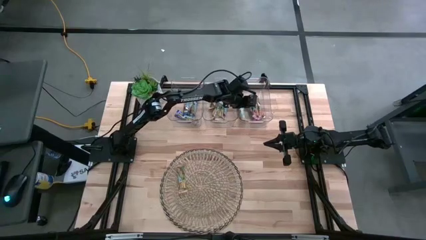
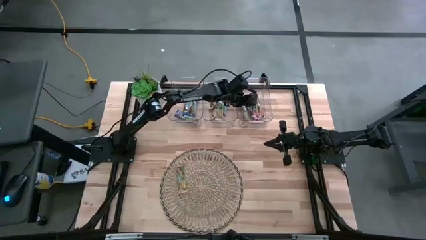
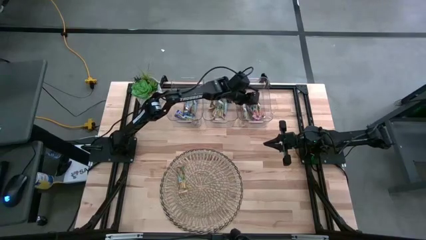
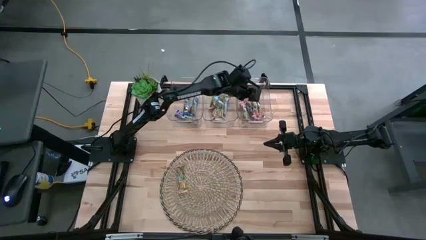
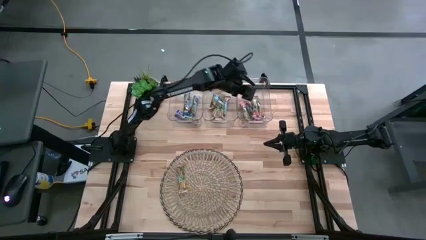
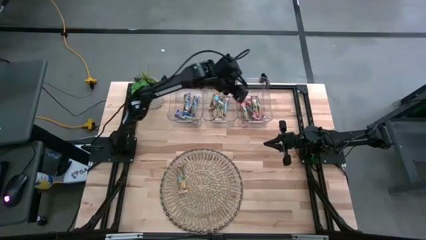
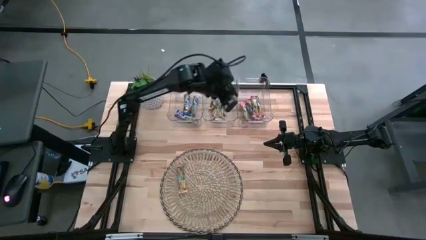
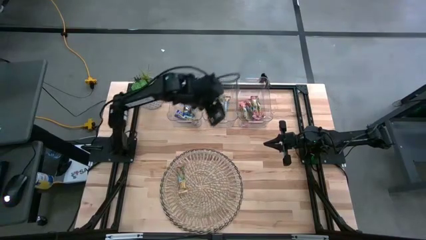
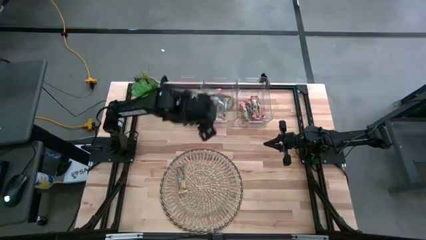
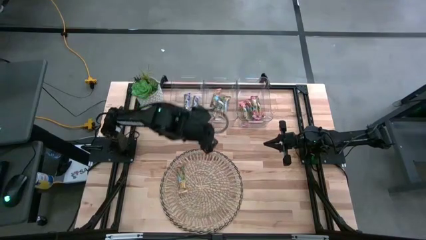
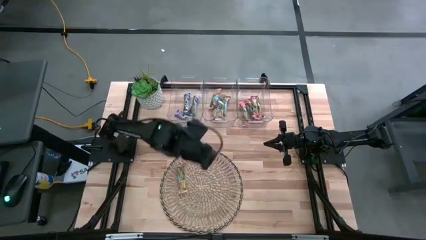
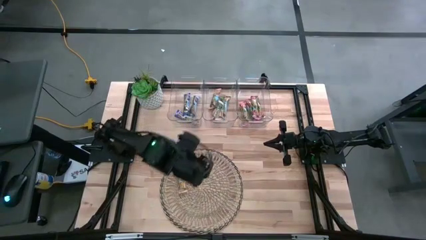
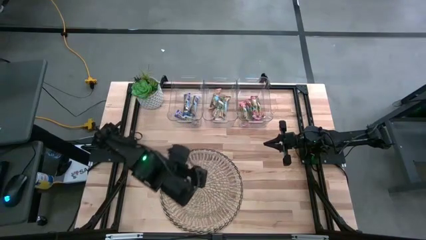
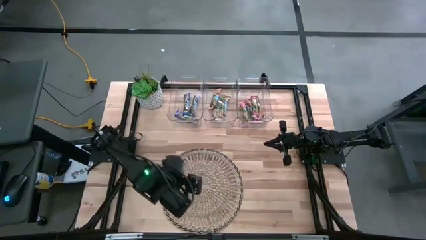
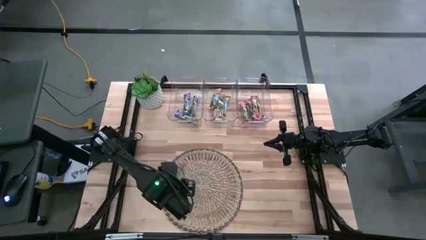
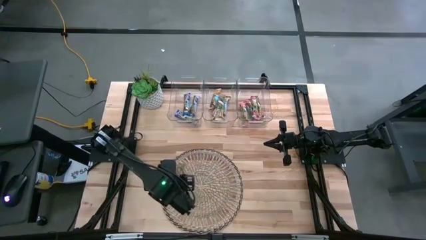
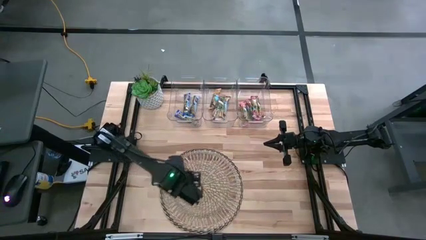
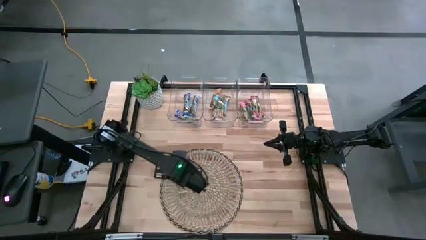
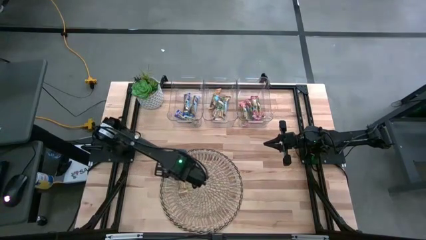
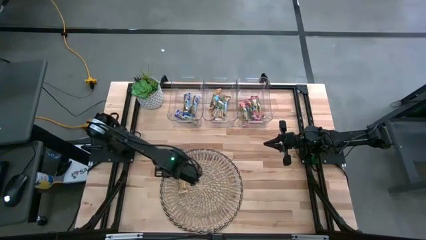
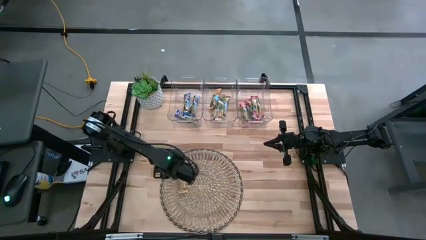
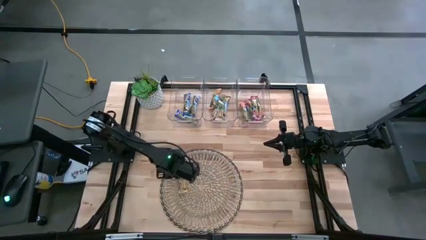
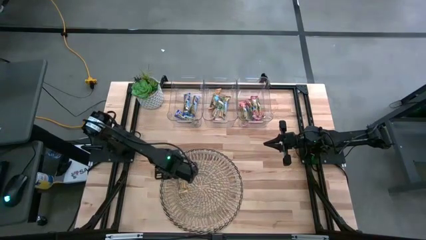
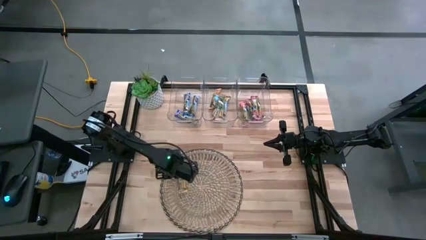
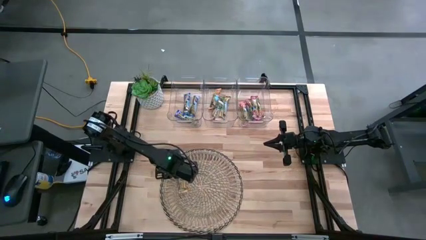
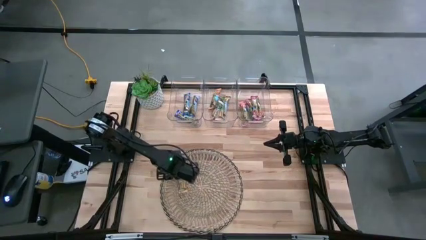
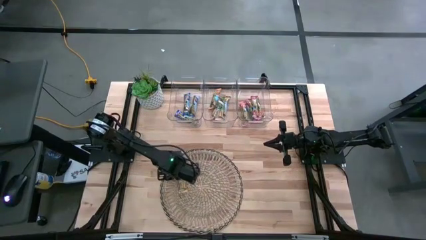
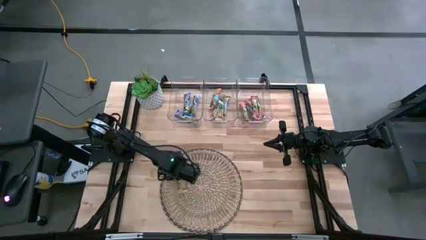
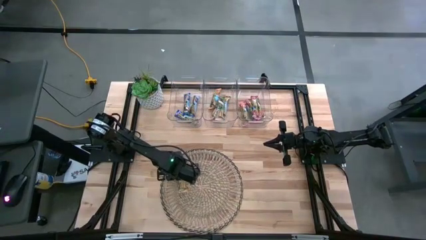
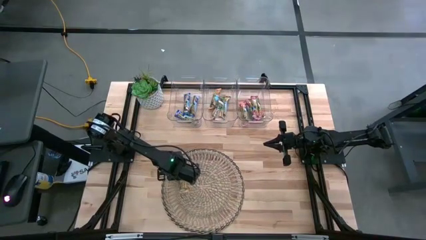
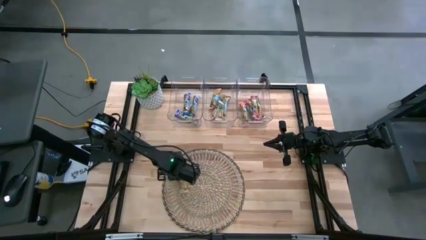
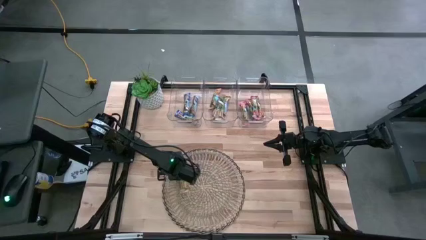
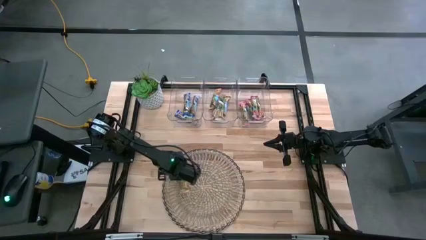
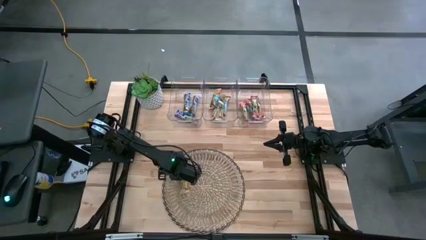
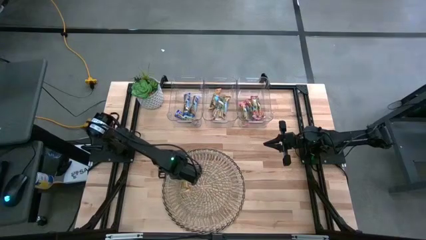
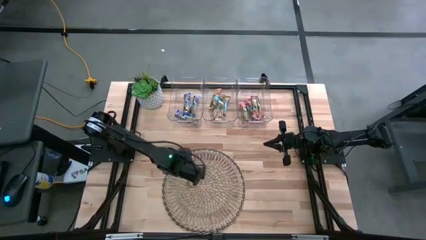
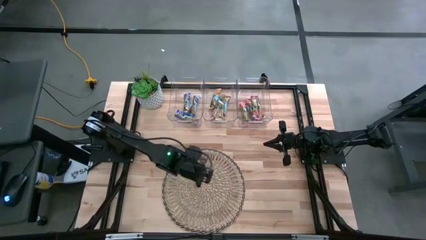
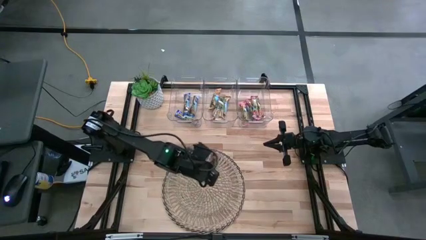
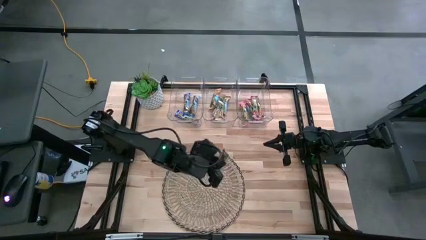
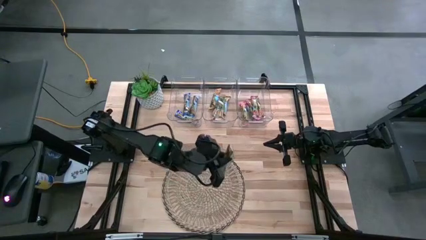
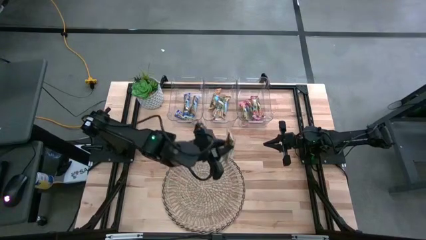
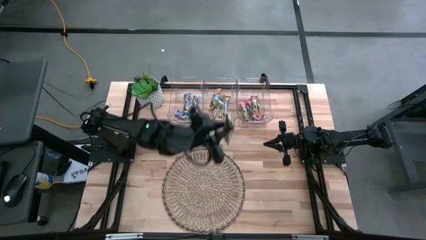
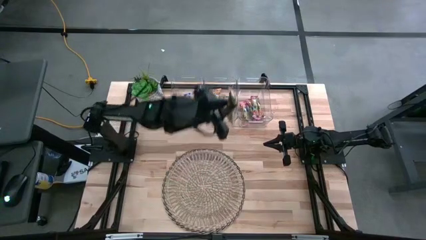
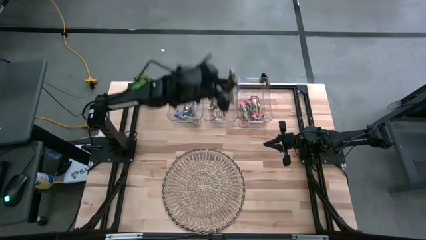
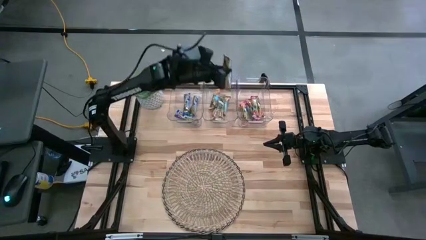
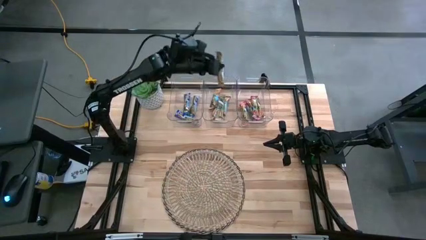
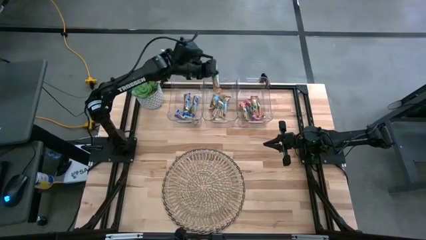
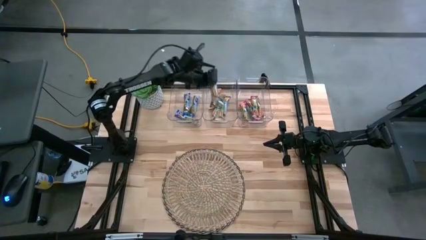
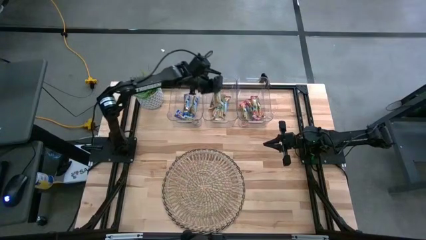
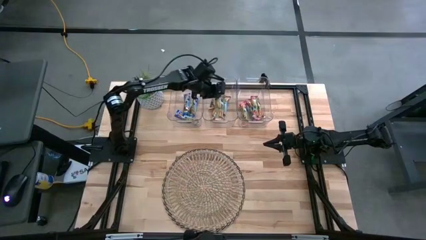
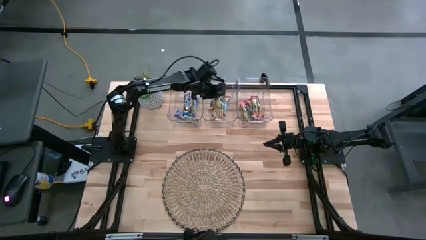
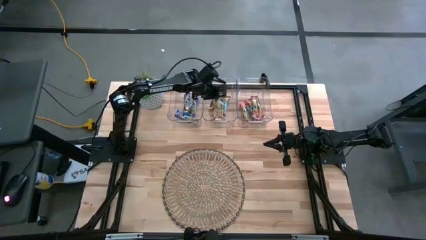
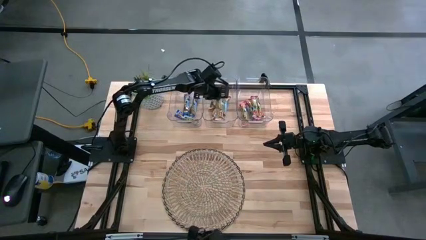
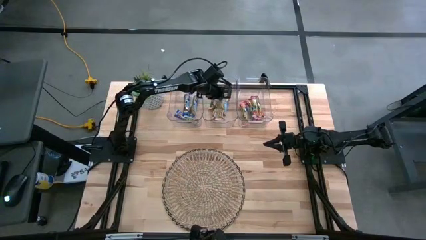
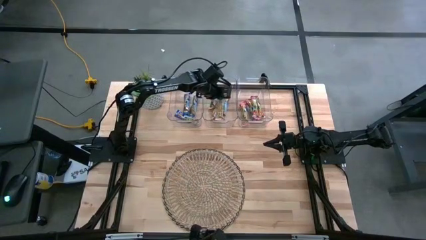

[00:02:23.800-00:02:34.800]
Task: Pick and place Granola Bars by type
Put the yellow granola bar into the middle transparent bin

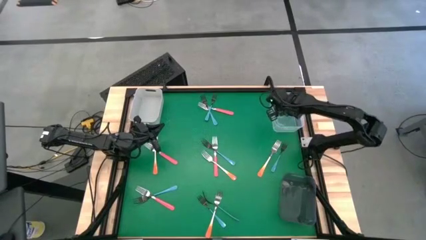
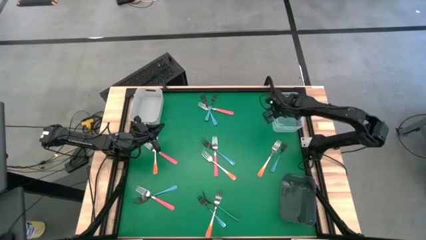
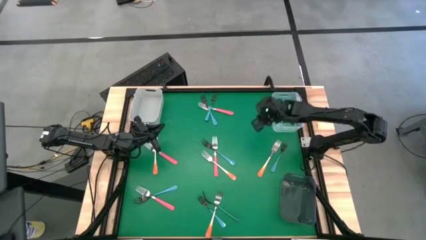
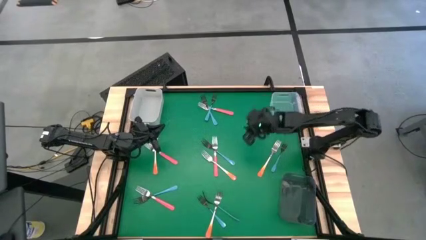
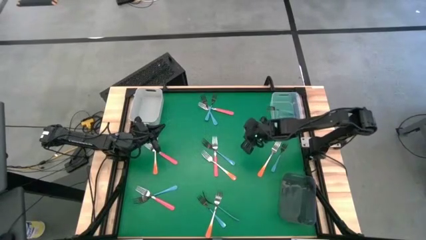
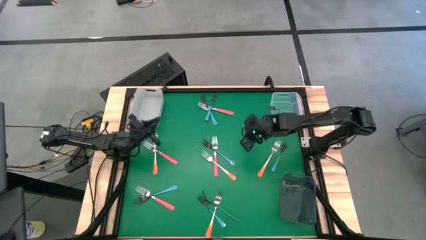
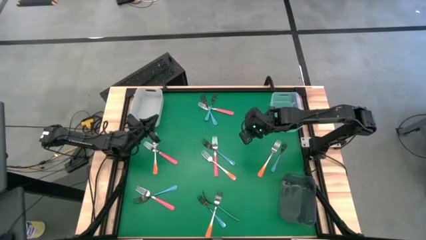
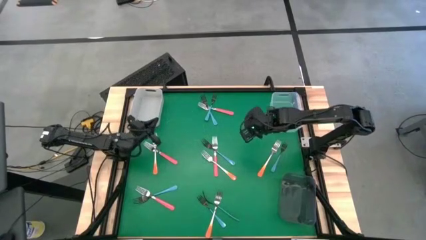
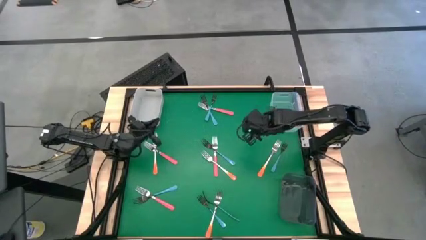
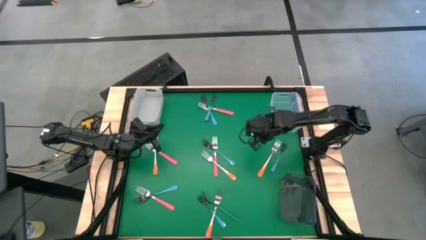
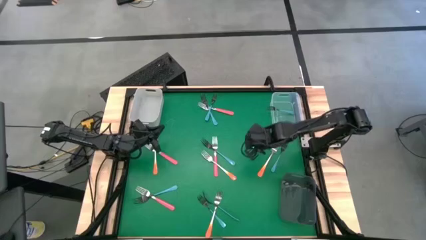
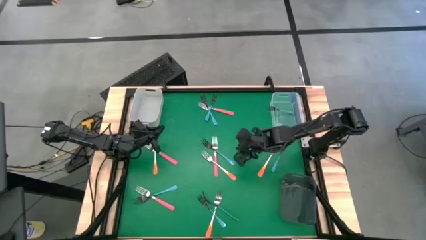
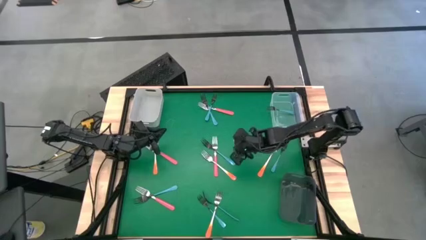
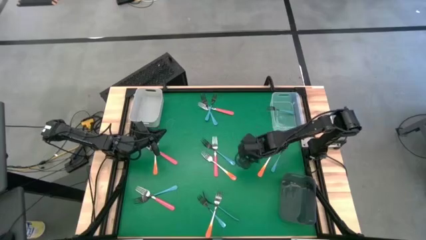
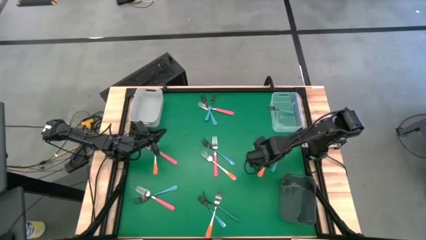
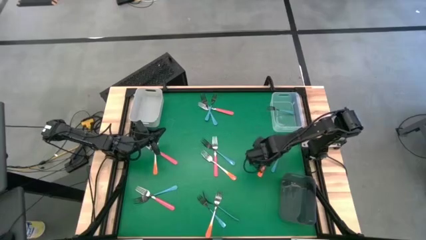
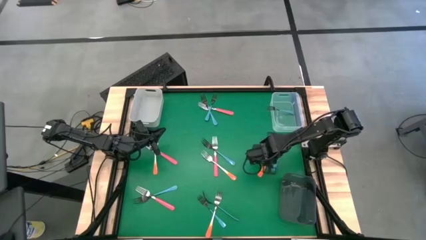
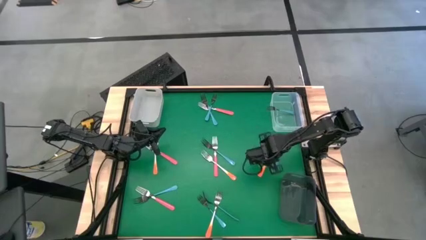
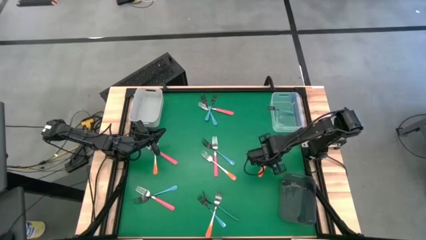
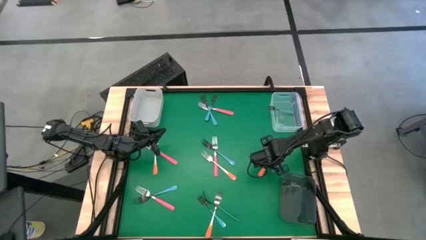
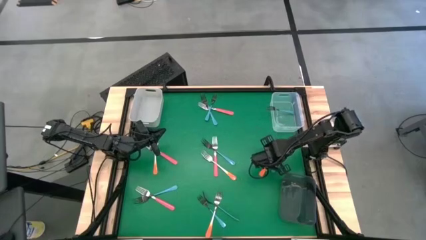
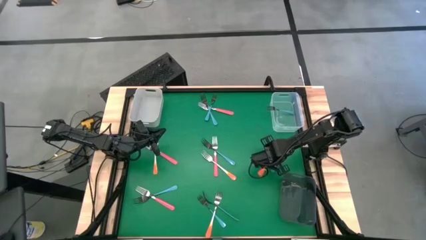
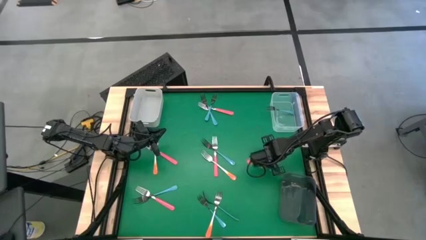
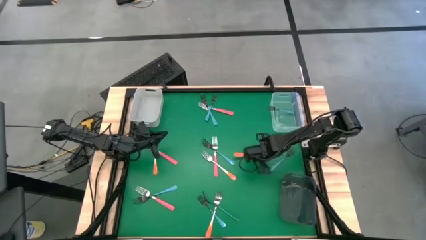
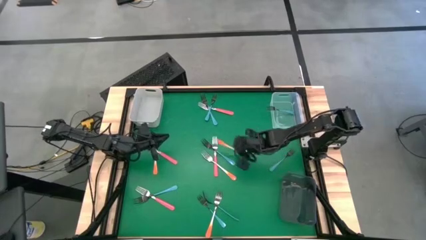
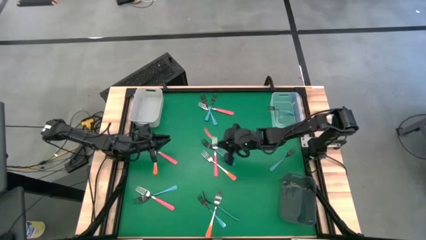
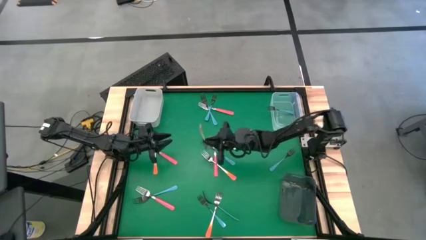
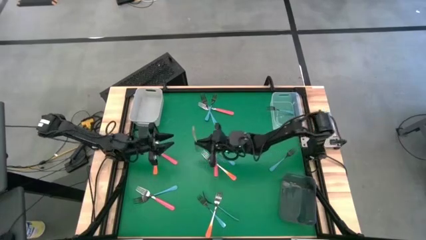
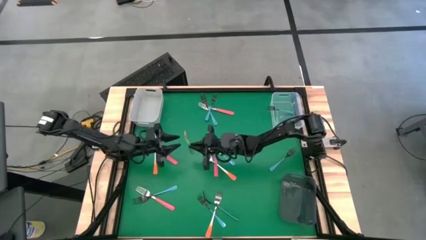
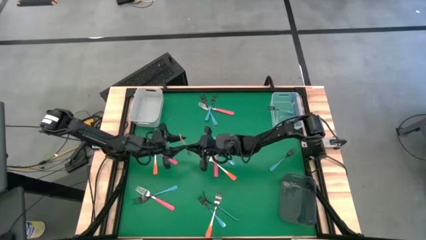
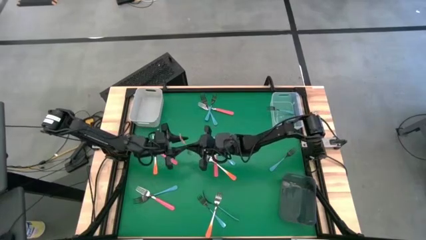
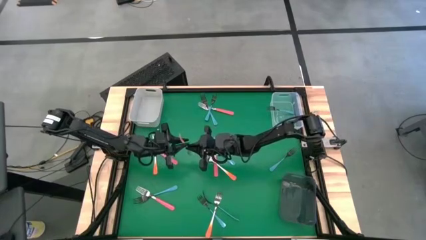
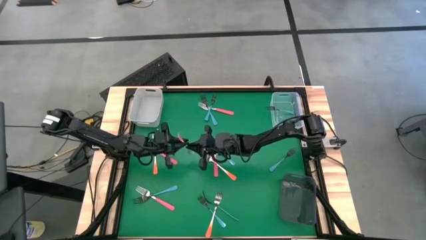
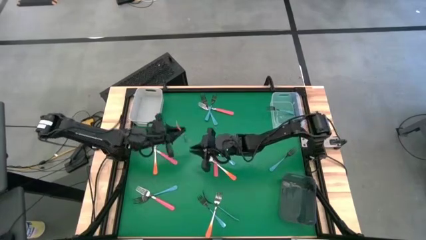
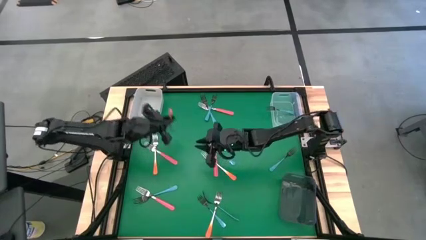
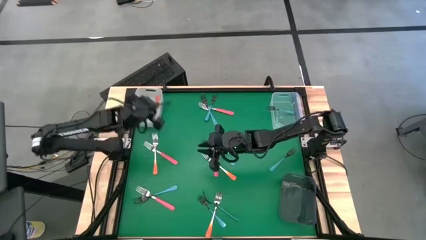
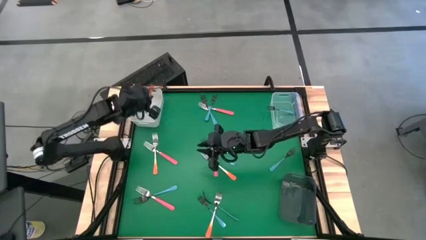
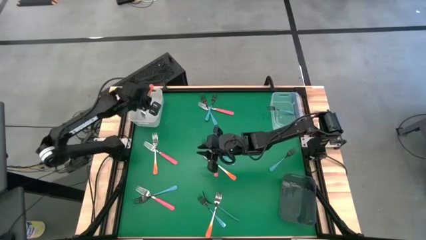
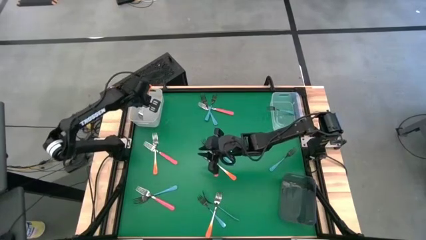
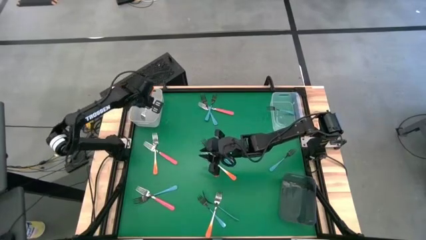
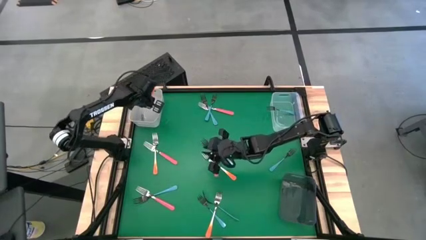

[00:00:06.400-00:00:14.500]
Task: Sort silverware by color (type)
Put the orange fork into the white bin
